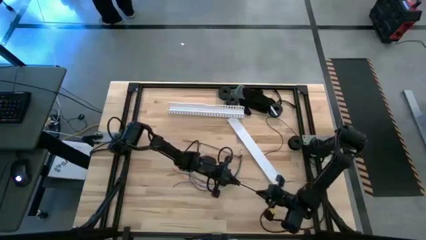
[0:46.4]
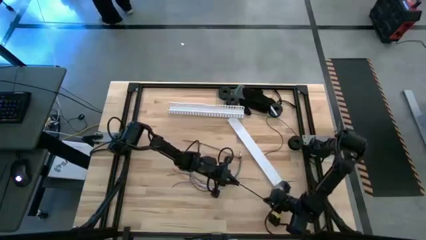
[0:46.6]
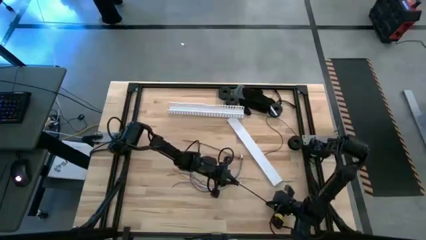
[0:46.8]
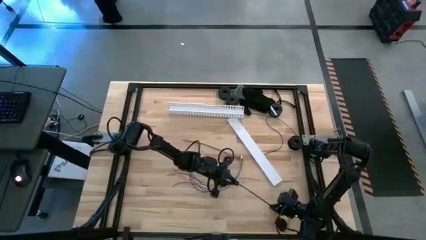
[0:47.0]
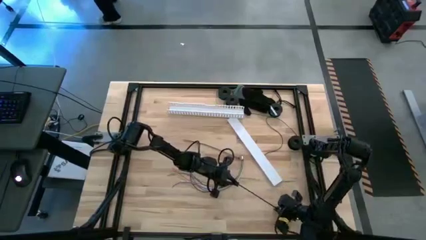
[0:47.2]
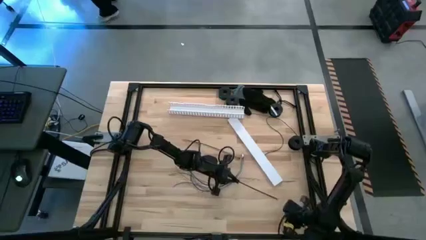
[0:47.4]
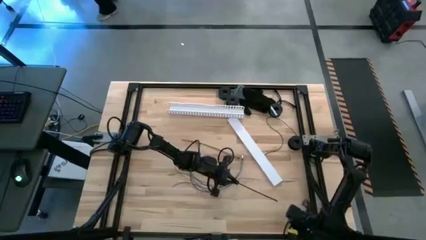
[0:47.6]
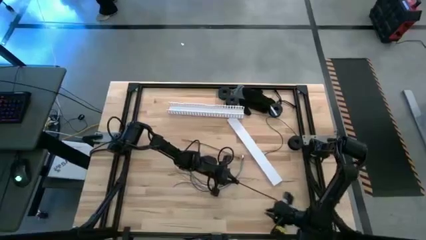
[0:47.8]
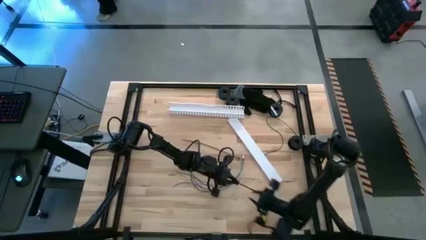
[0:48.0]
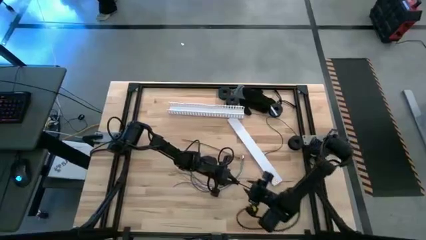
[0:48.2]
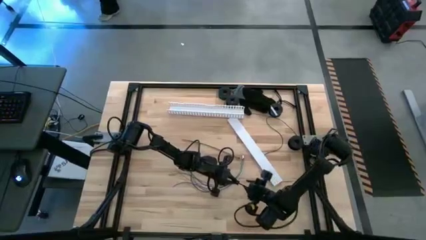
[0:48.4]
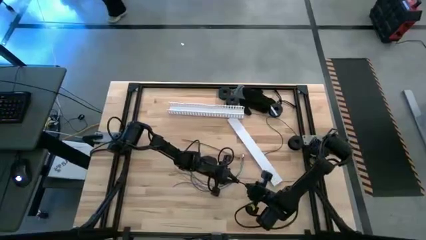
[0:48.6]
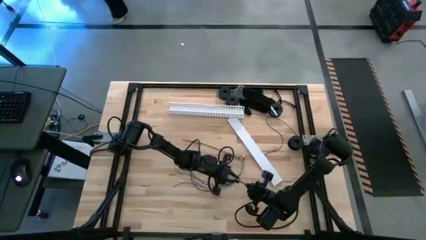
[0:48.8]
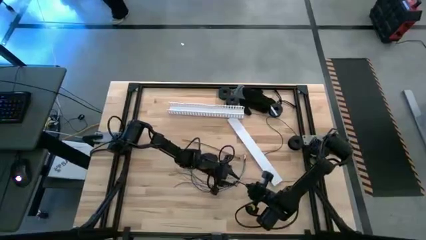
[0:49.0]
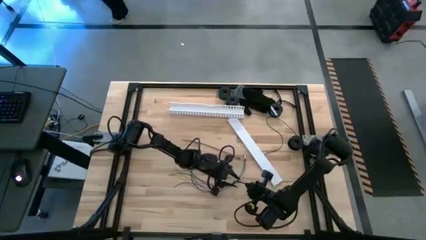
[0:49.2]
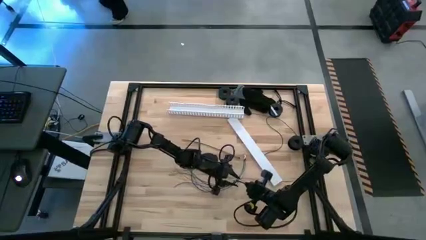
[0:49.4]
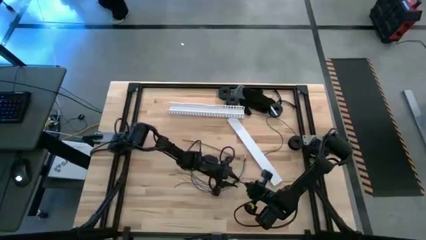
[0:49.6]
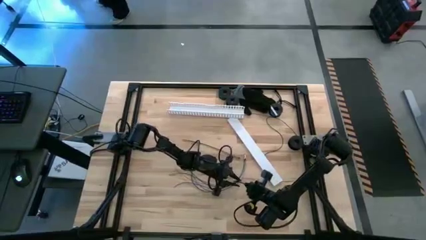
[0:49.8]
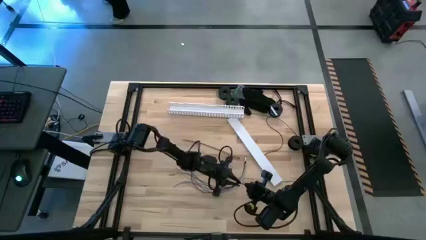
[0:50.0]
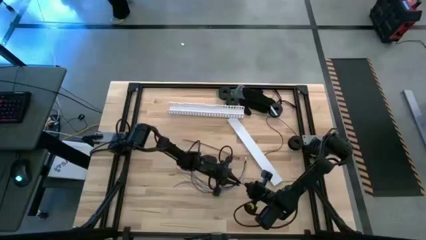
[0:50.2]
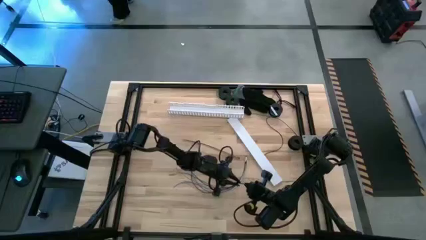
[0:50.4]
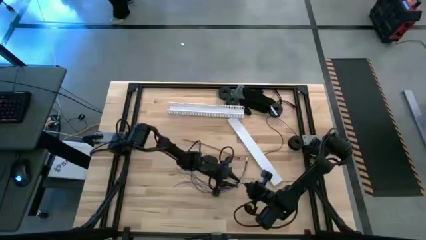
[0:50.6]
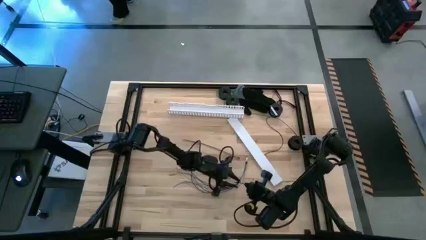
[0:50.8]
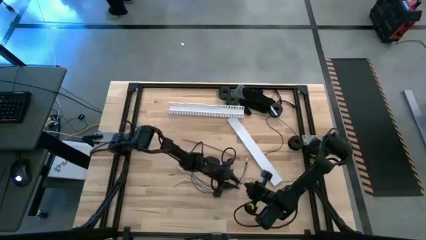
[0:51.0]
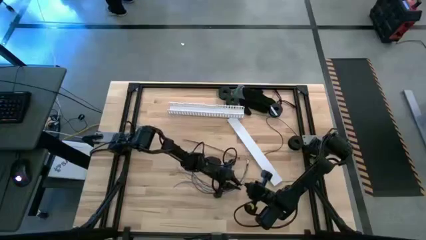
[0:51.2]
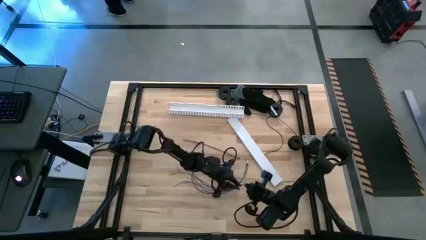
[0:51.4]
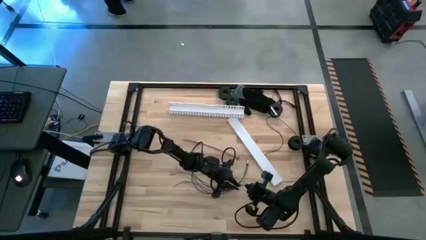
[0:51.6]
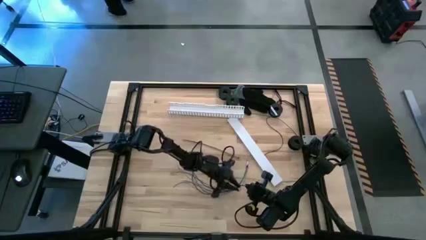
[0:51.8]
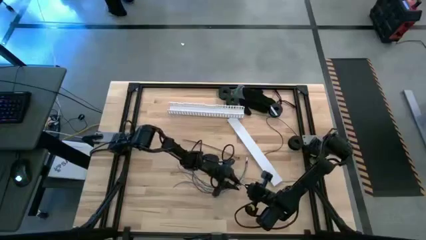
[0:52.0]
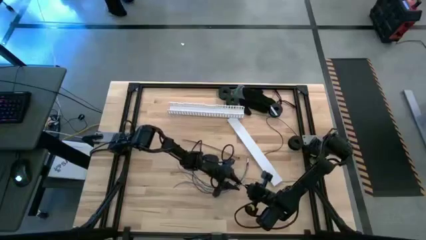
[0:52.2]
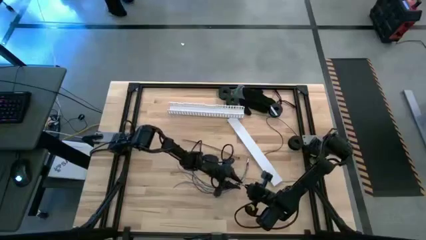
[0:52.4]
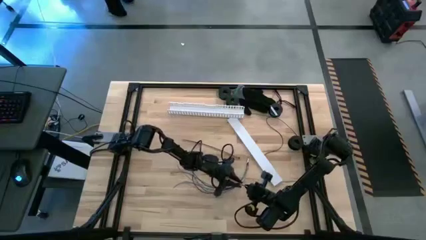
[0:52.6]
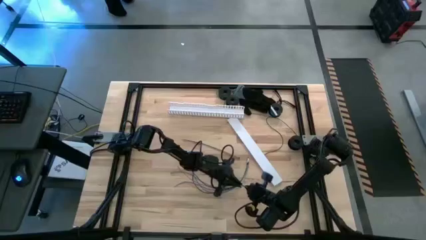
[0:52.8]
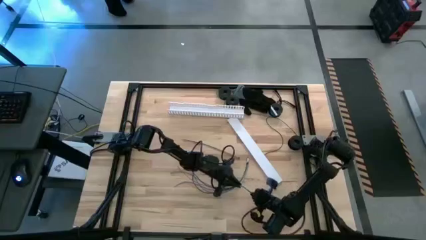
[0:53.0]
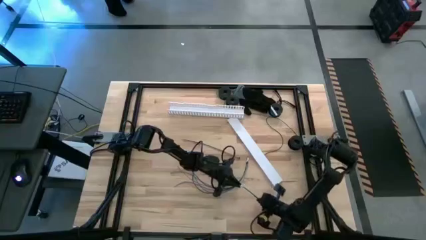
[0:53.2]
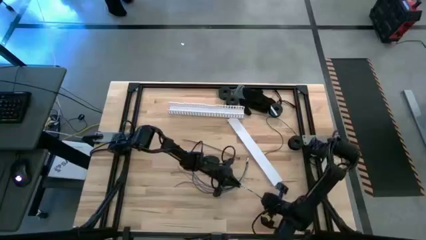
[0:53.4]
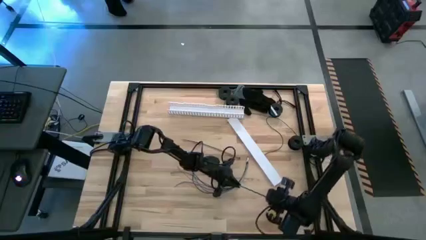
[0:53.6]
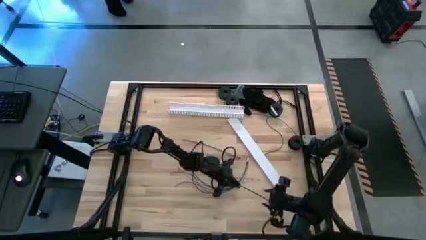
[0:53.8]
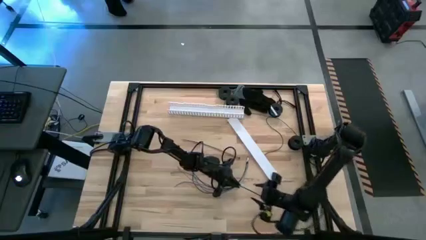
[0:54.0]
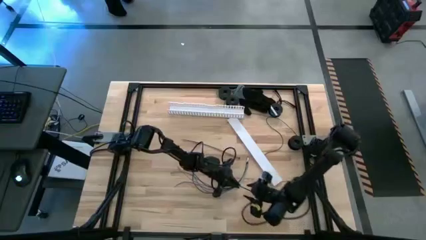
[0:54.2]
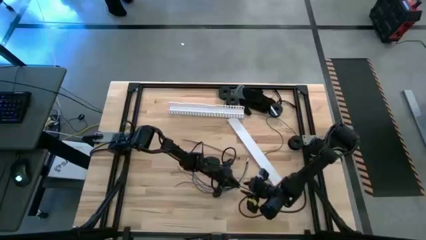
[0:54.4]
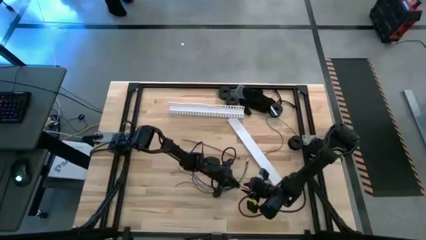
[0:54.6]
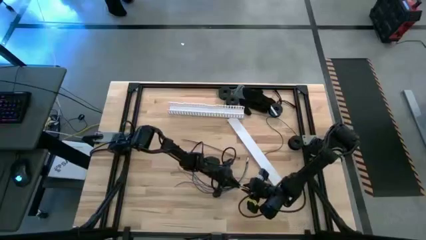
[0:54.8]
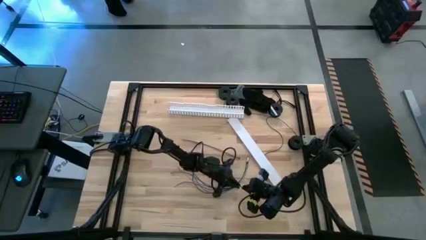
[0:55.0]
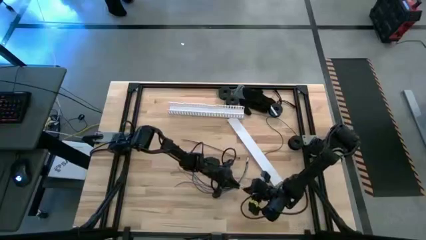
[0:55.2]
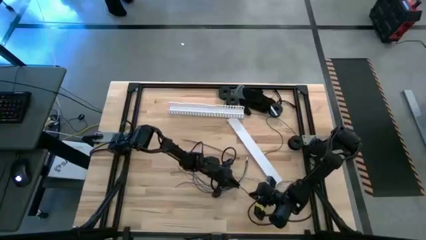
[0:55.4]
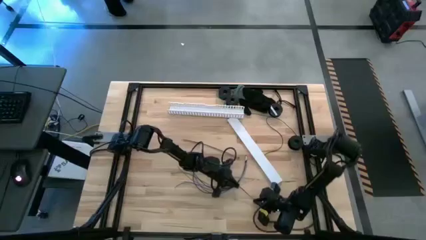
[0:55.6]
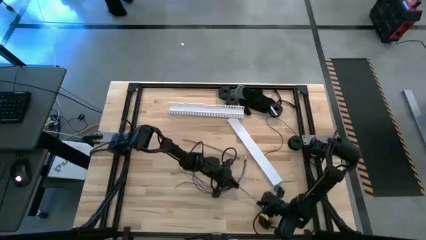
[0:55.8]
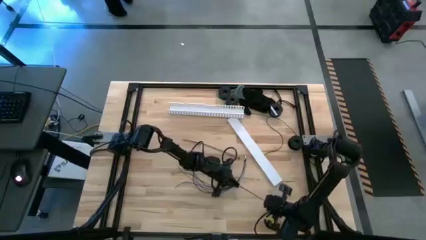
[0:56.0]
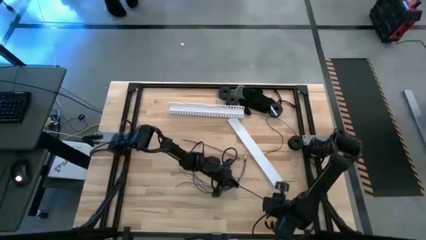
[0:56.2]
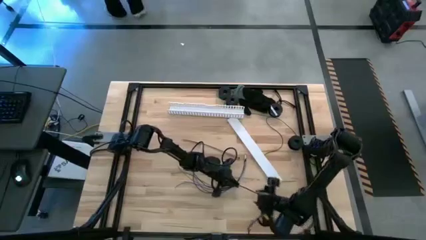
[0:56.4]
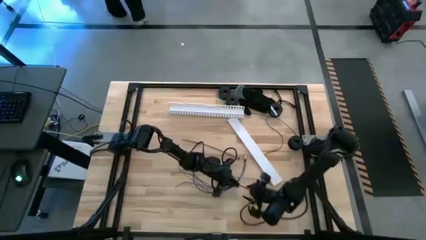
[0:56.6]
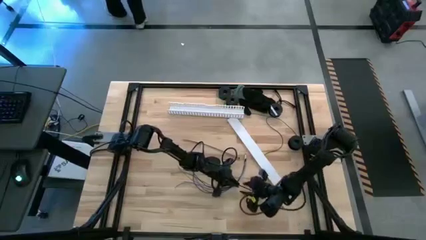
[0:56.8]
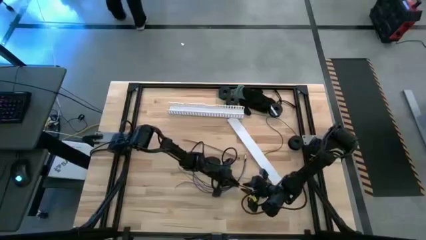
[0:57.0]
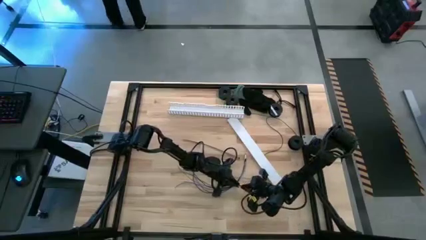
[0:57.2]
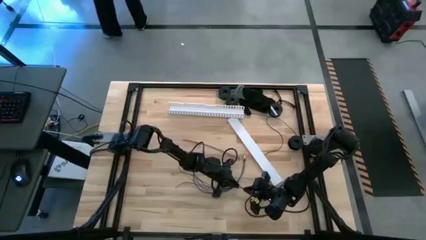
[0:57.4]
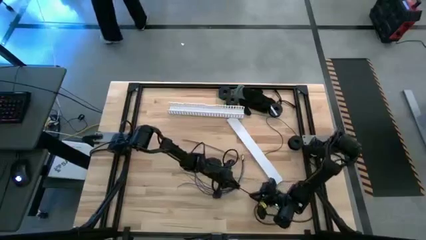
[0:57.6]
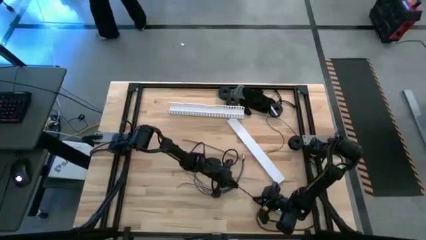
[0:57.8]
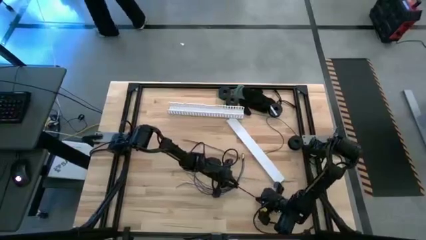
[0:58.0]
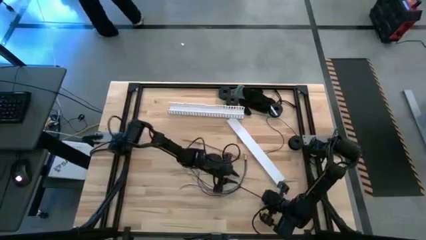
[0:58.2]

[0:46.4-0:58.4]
Task: Ziptie cables
Wrap the wire cables with the black zip tie

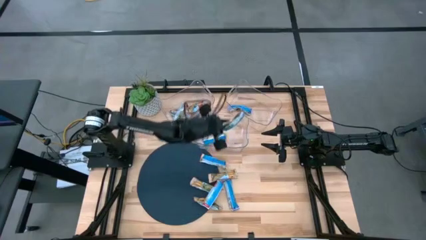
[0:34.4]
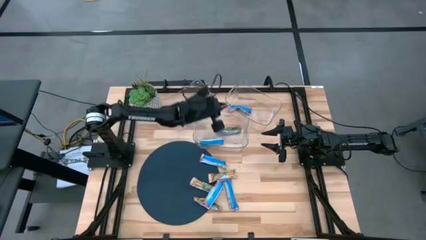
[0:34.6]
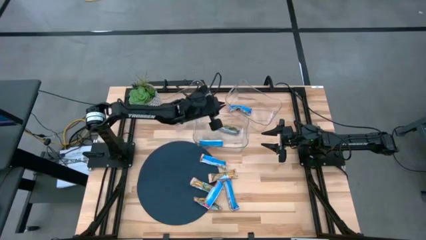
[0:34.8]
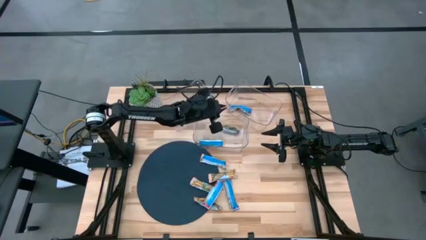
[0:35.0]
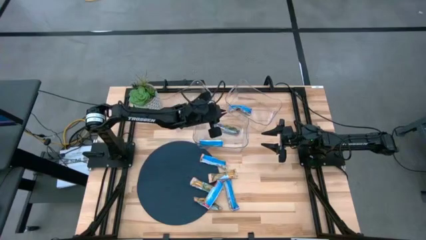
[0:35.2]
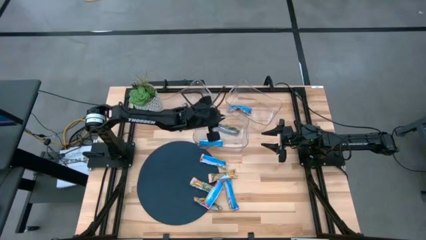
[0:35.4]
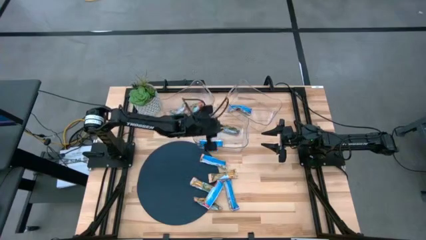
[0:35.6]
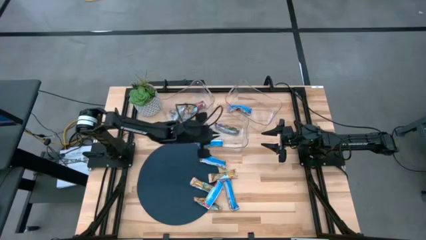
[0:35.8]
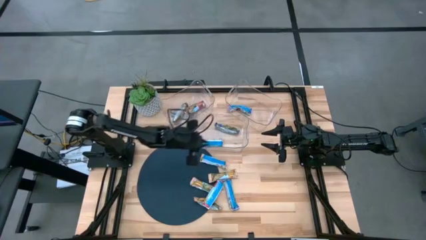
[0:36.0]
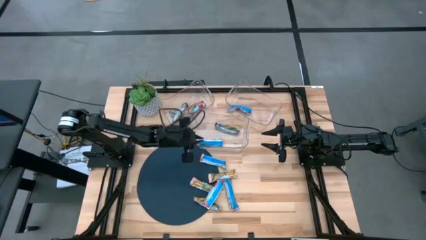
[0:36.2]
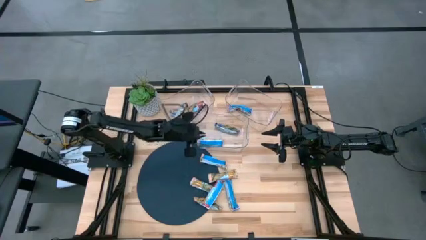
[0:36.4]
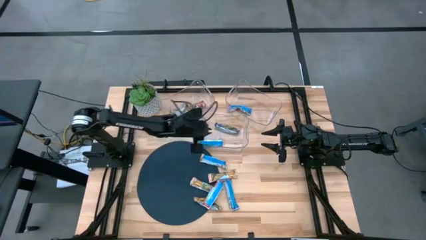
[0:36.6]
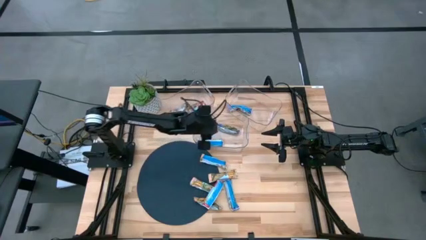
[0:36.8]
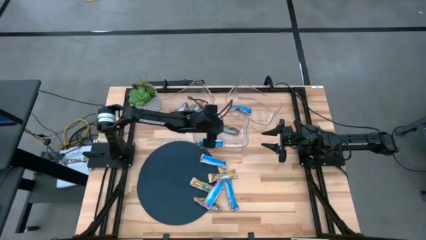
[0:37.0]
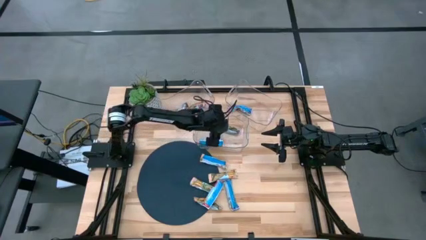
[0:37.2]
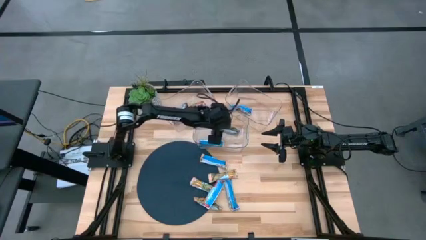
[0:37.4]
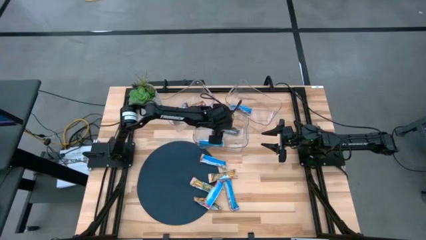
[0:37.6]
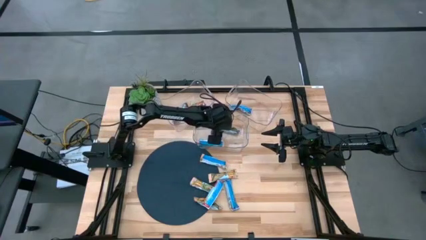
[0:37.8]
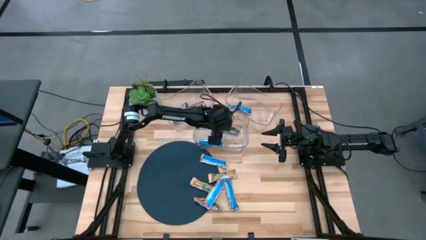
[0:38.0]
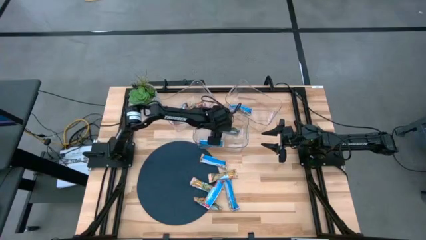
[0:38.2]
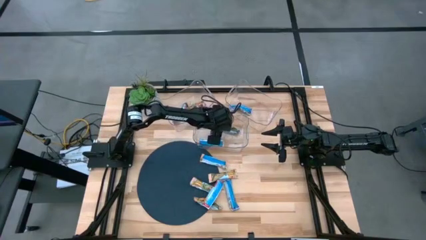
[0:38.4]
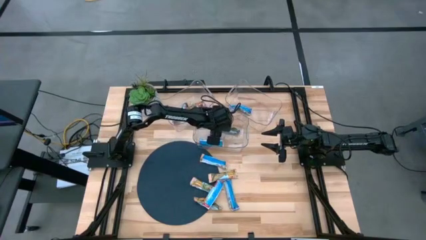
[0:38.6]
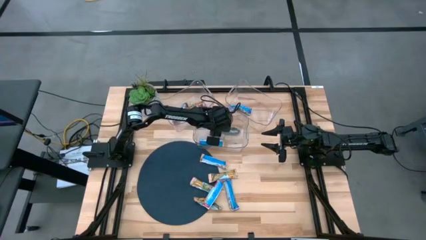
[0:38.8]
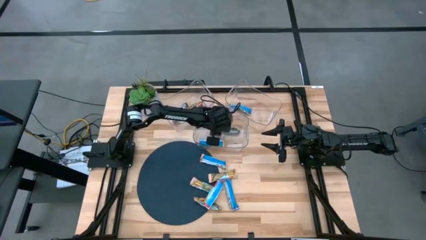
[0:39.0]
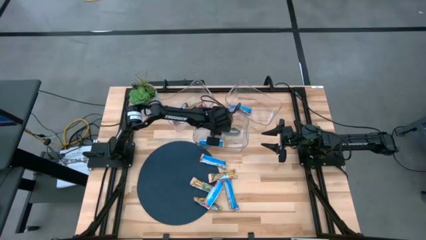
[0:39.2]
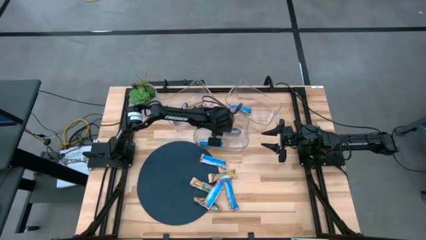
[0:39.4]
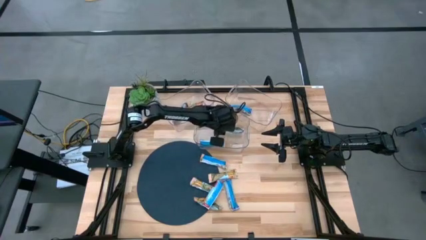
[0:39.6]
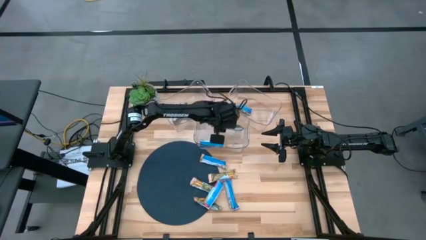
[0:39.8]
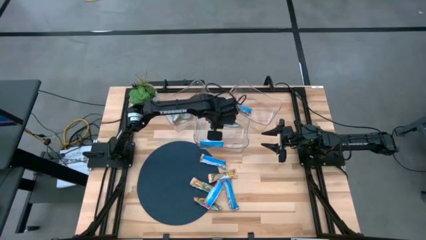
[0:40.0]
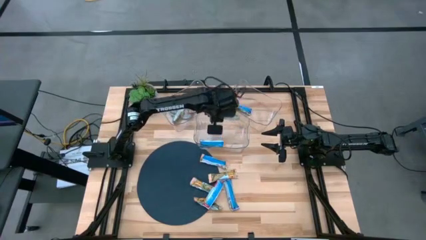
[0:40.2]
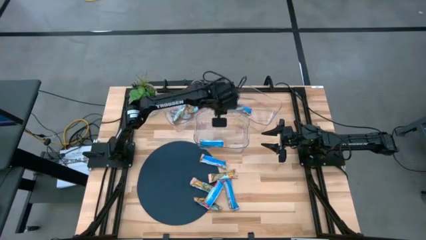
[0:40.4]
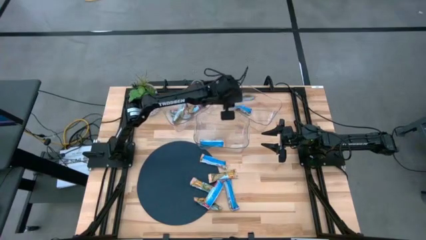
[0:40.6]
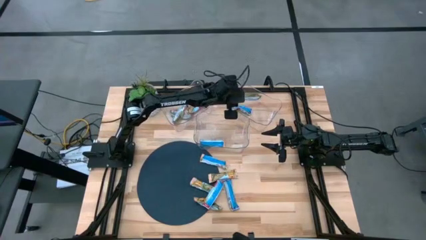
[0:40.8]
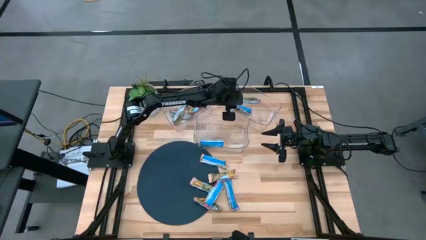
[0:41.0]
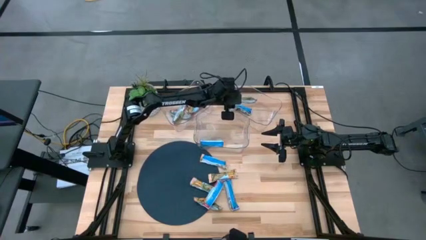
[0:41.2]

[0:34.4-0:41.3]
Task: Pick and place Granola Bars by type
Put the blue granola bar into the right transparent bin
